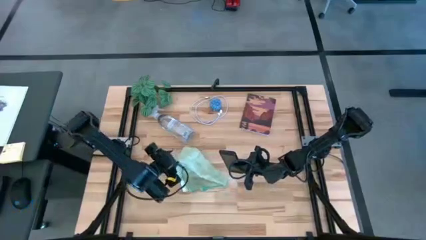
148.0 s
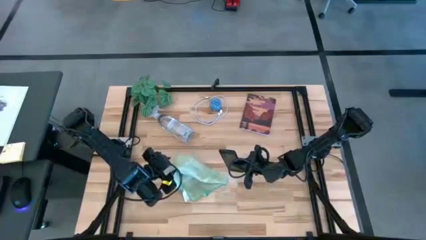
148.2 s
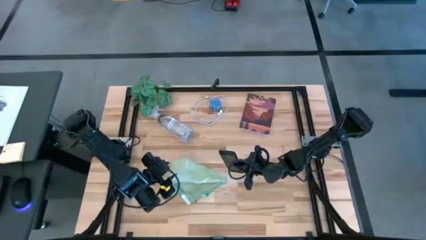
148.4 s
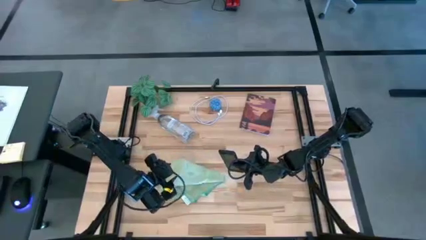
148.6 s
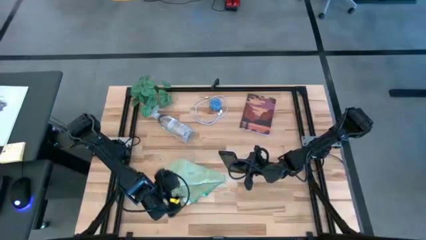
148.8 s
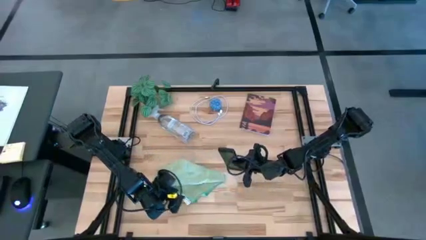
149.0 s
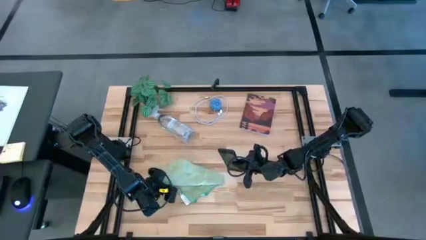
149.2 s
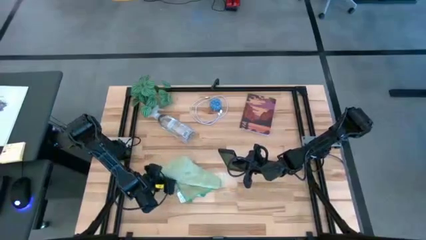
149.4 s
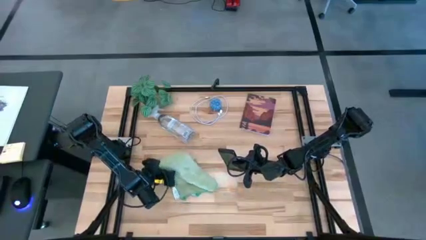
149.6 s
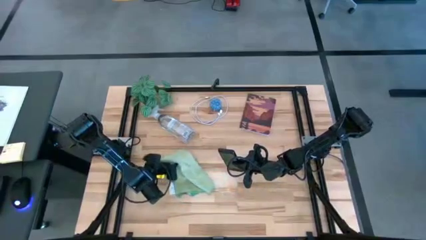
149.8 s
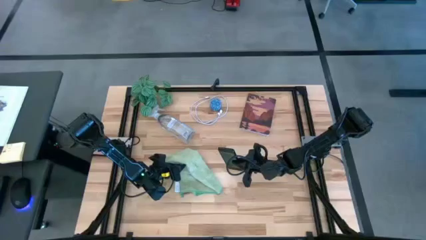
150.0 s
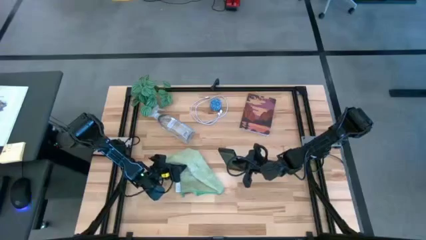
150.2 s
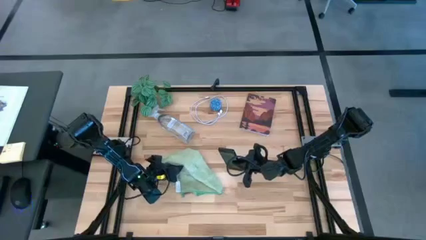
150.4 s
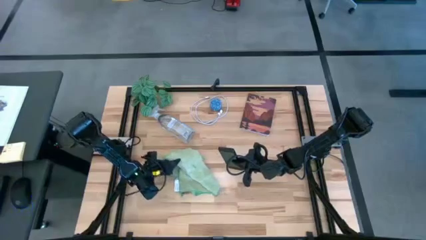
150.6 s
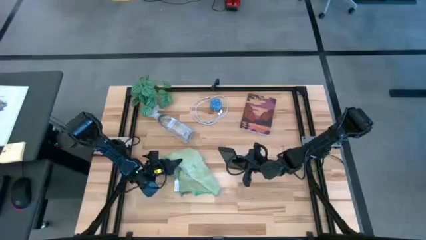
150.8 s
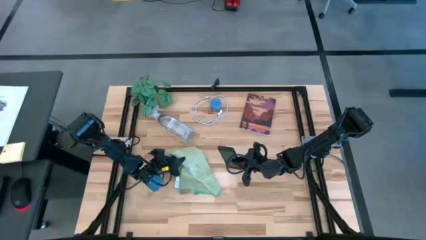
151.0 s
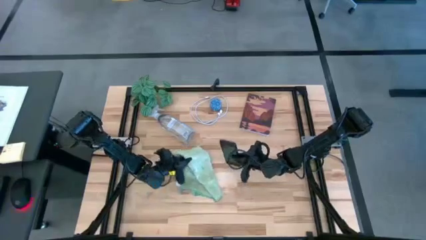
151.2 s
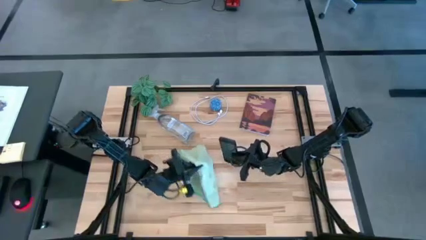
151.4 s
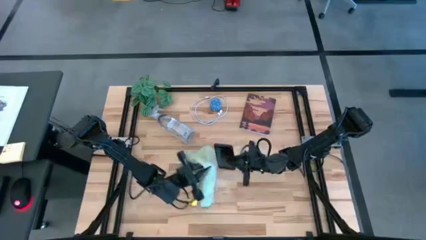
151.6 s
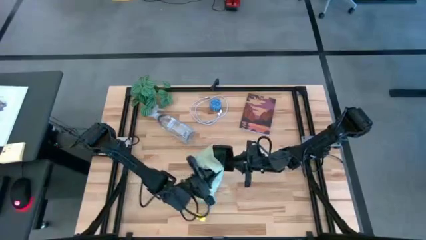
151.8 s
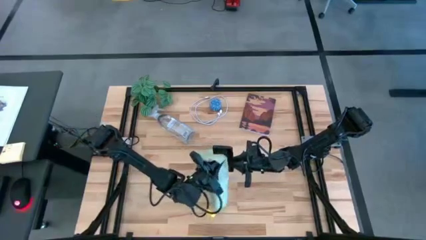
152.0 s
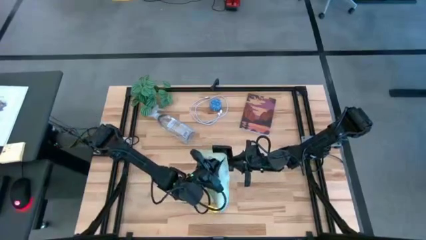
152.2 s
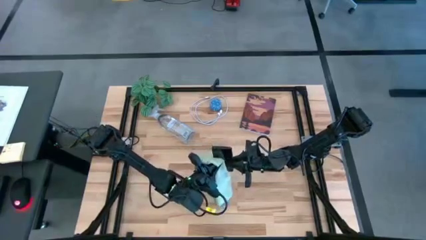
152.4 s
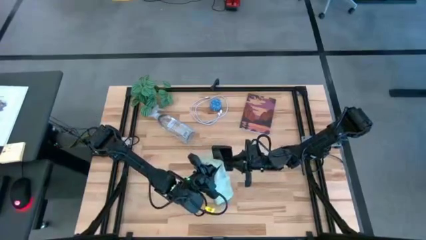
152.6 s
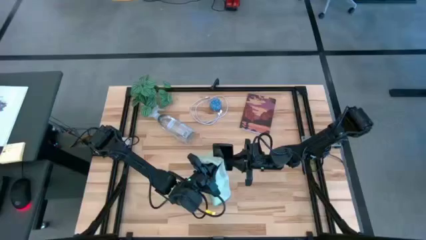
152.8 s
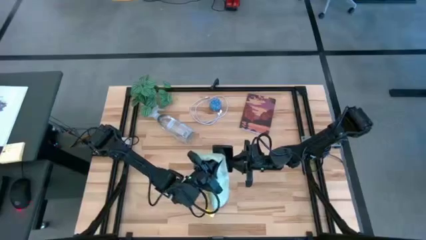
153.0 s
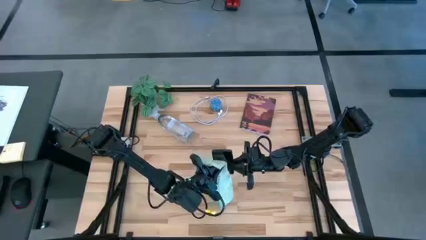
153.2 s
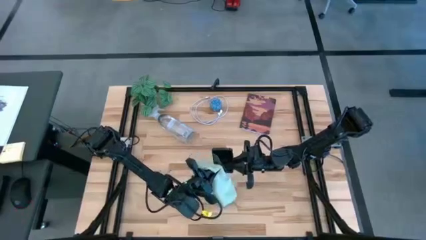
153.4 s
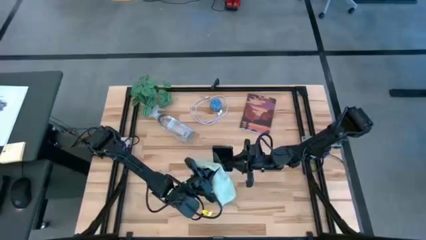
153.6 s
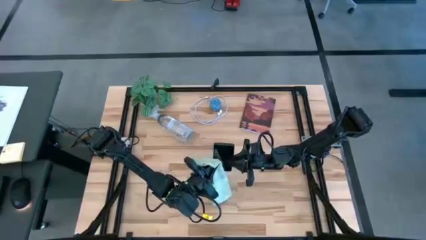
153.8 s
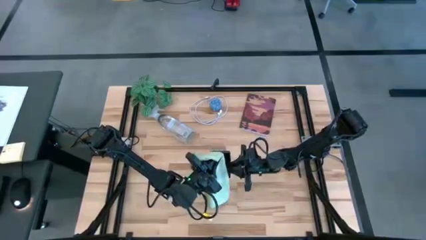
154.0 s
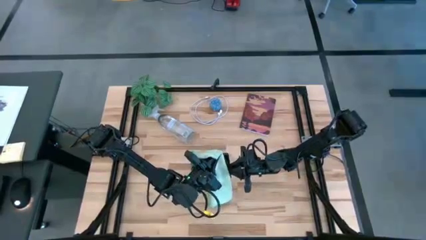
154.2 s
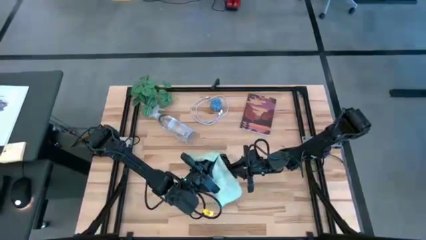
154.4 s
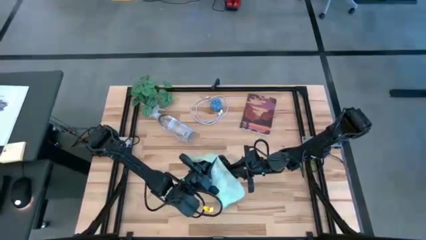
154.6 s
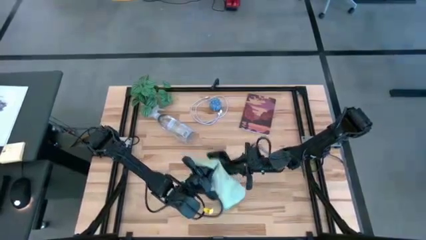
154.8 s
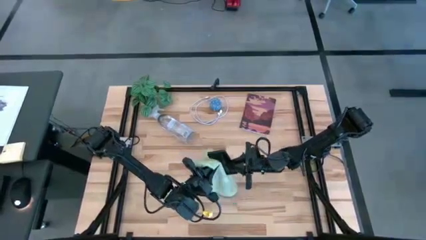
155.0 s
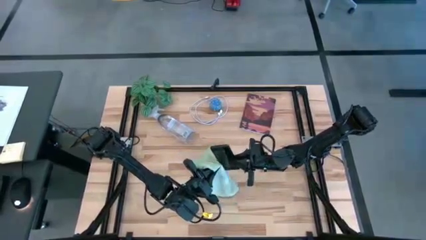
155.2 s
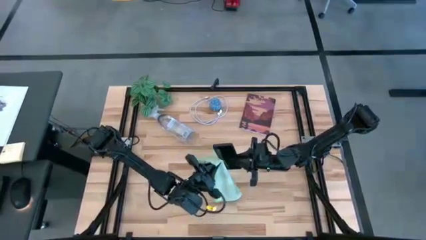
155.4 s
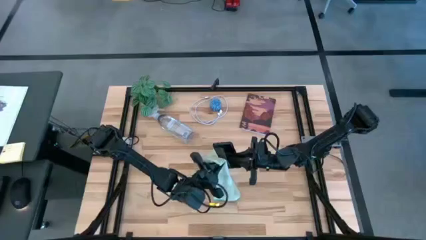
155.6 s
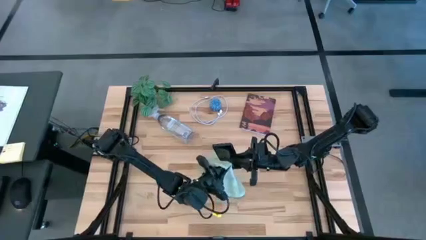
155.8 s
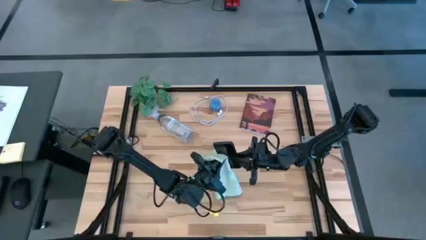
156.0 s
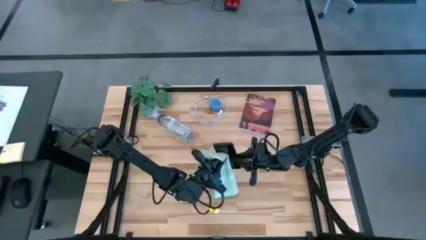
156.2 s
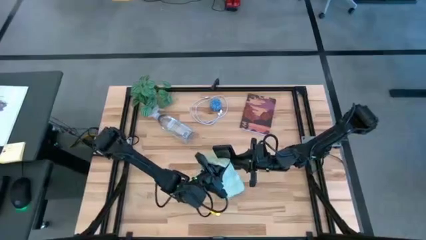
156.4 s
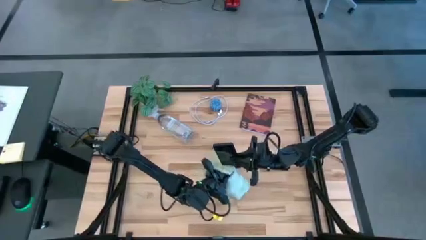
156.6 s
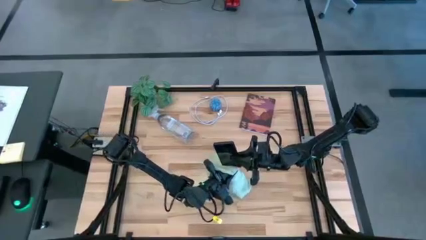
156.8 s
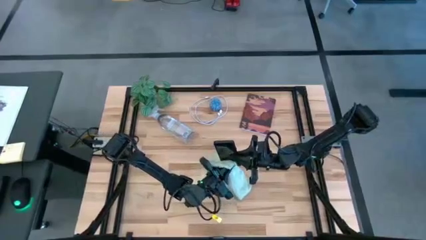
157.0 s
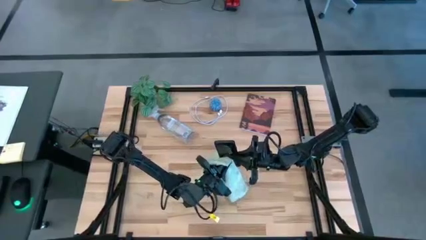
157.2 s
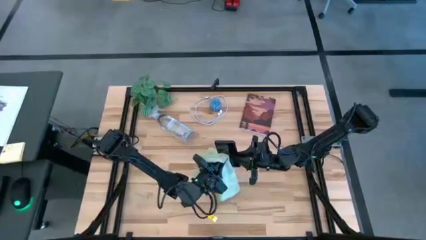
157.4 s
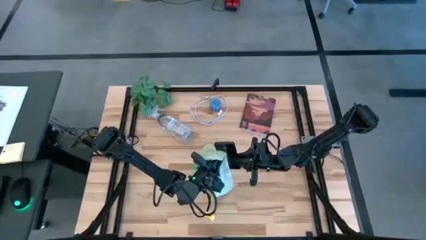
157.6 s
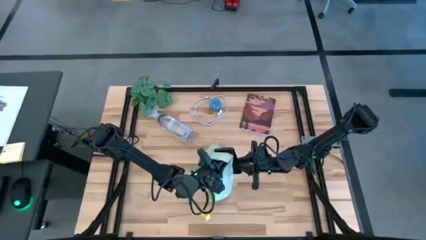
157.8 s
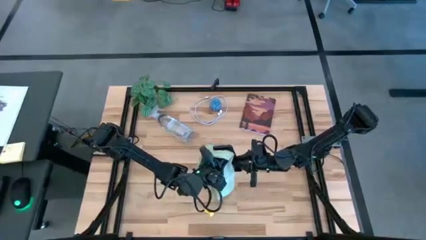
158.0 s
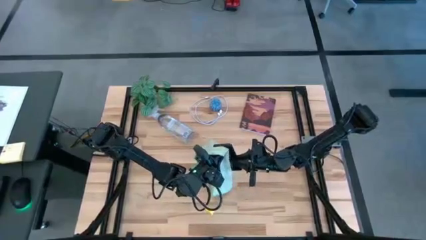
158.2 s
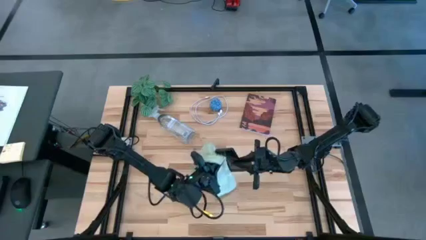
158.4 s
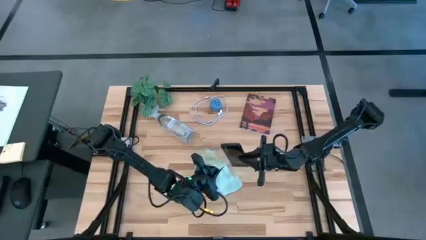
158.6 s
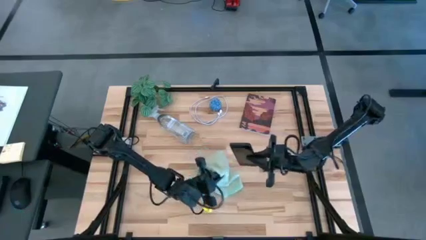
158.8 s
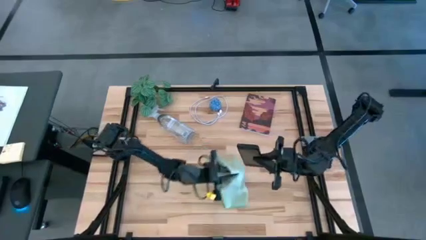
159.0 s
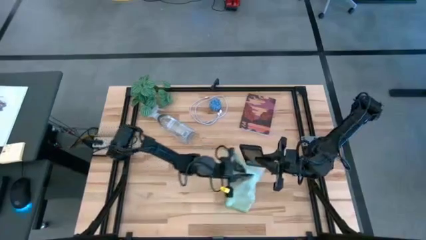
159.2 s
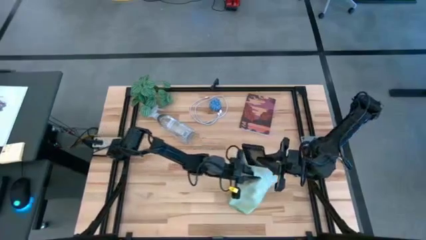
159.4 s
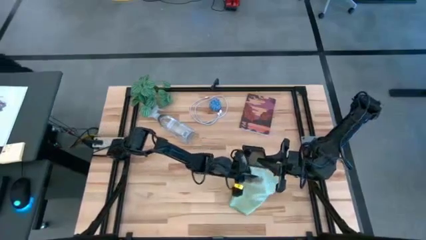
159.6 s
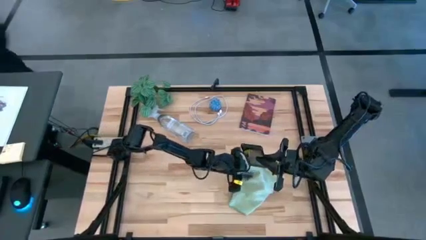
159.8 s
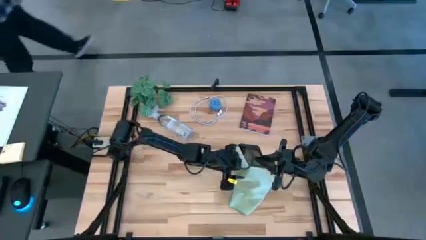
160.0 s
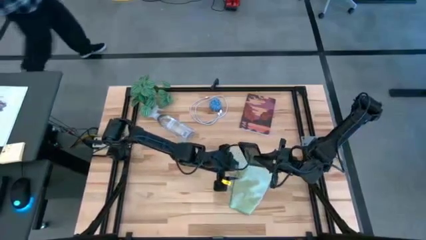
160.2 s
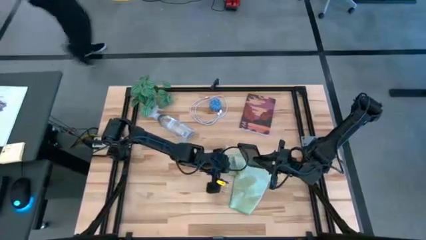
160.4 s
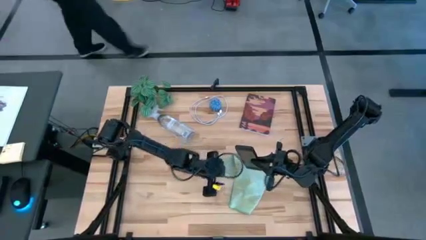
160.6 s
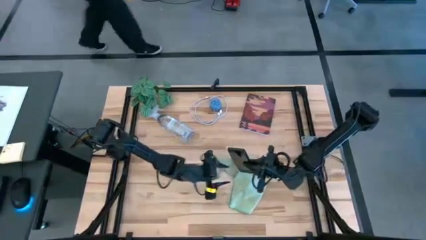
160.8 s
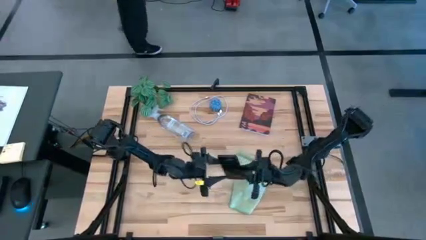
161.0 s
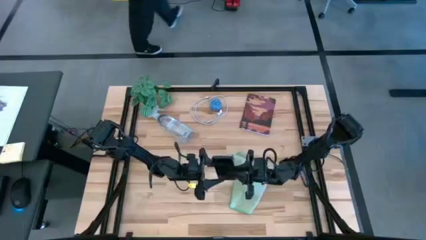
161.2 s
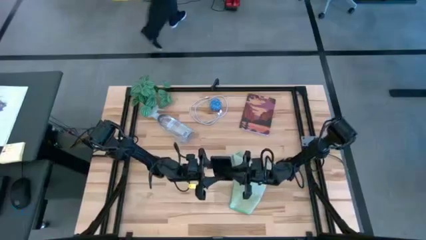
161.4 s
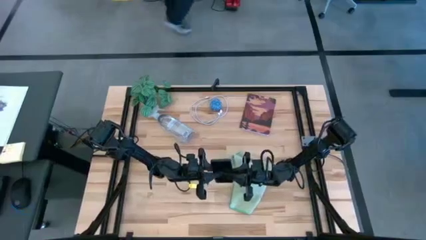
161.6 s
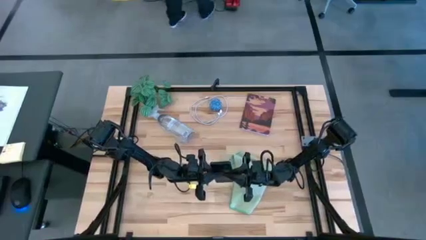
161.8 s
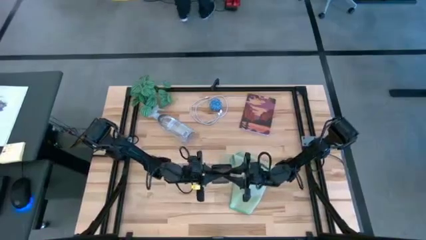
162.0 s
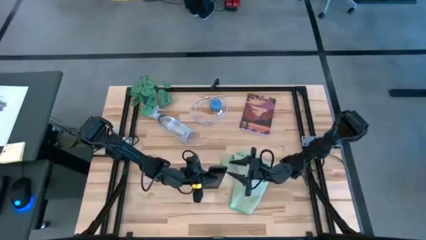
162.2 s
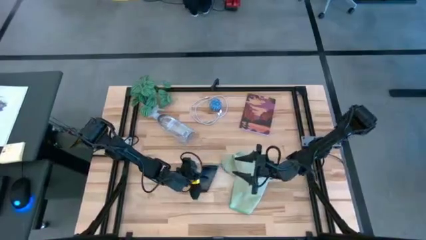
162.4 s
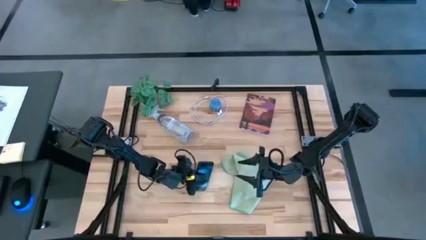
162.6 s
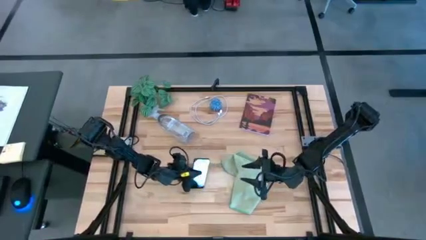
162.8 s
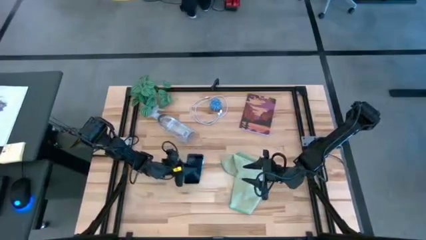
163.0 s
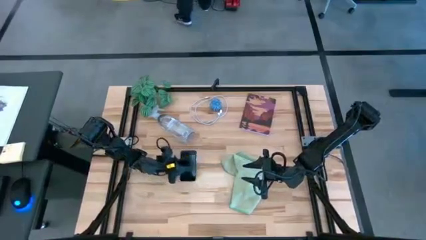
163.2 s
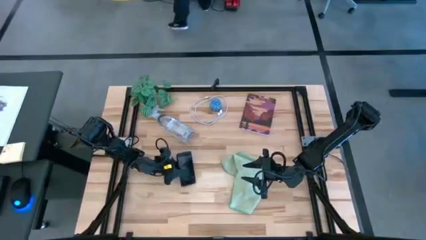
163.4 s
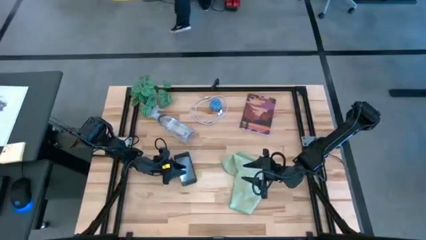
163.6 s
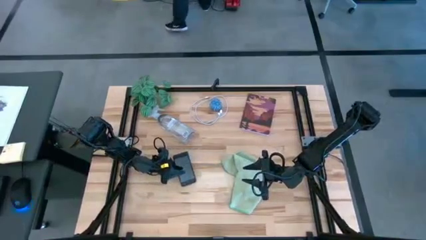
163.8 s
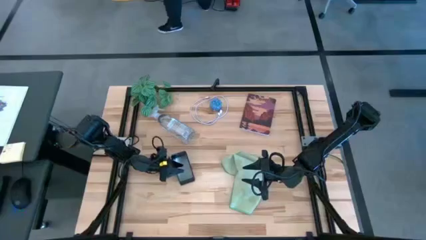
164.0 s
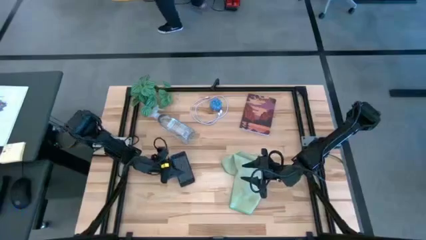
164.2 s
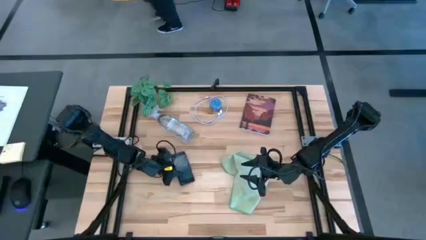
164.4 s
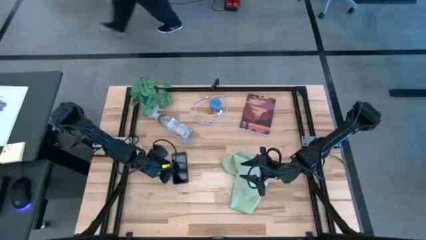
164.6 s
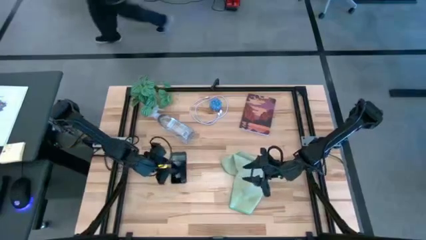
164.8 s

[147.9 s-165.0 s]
Task: Apply microfiber cloth
Wipe the back and front of the black cellphone with the green microfiber cloth
